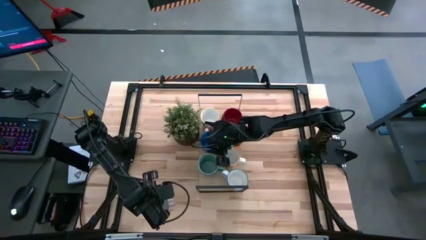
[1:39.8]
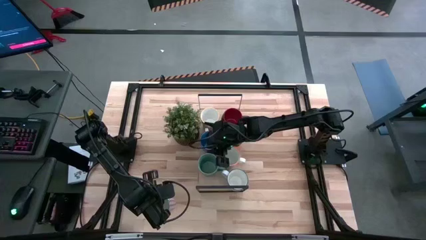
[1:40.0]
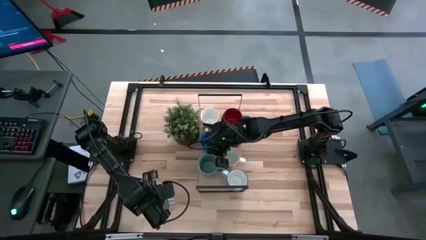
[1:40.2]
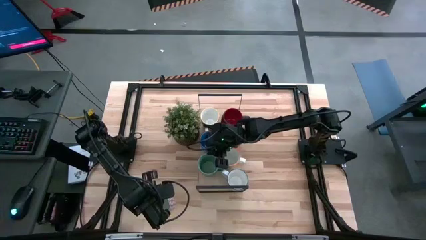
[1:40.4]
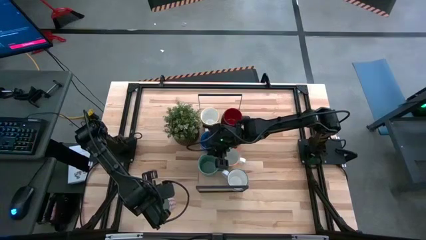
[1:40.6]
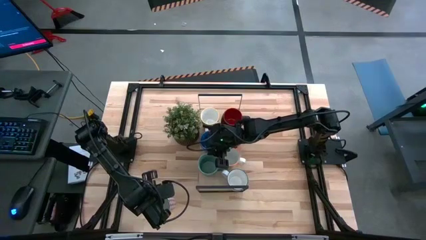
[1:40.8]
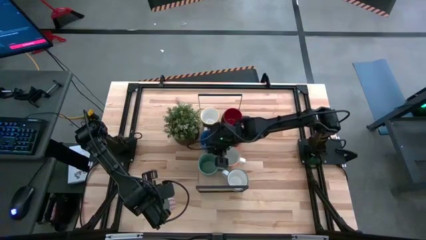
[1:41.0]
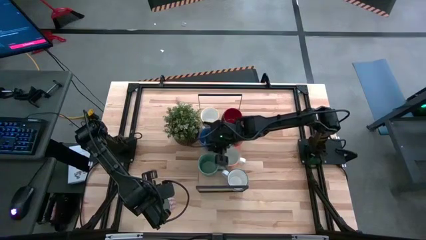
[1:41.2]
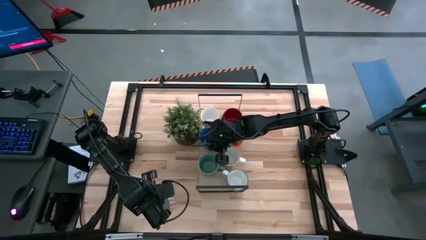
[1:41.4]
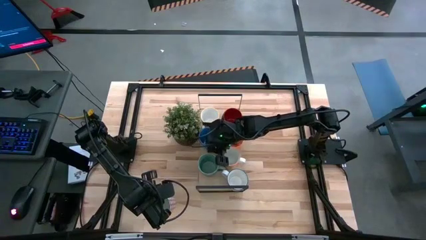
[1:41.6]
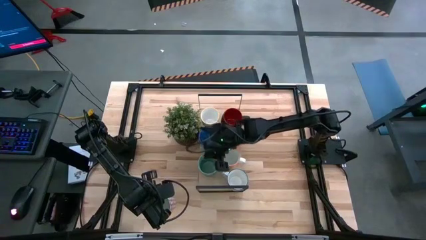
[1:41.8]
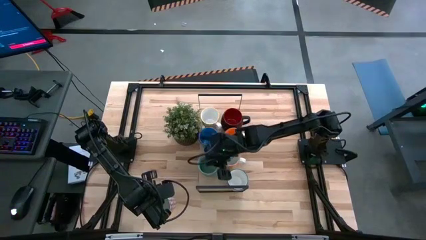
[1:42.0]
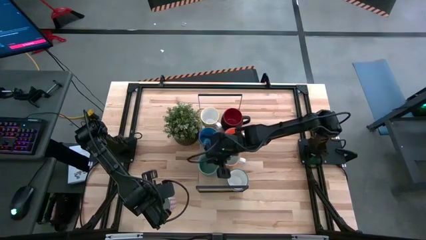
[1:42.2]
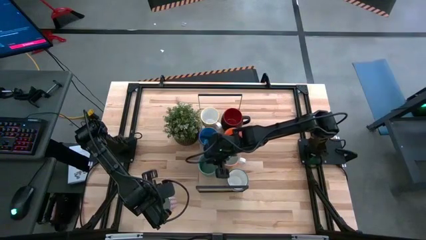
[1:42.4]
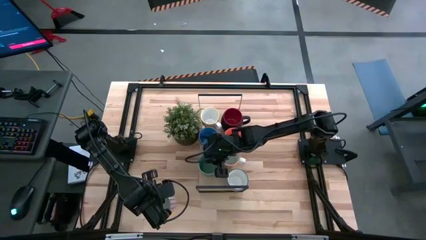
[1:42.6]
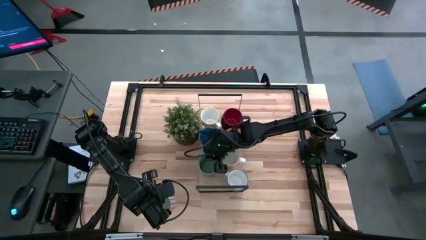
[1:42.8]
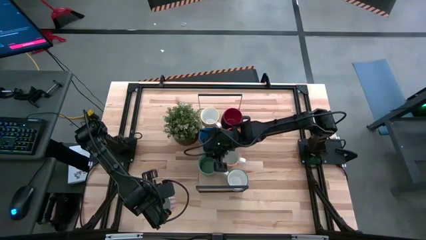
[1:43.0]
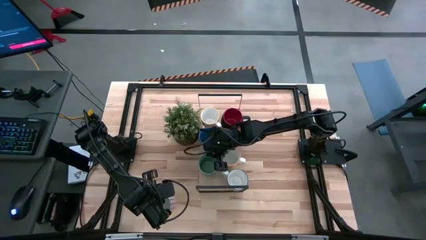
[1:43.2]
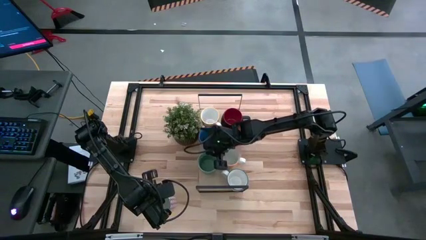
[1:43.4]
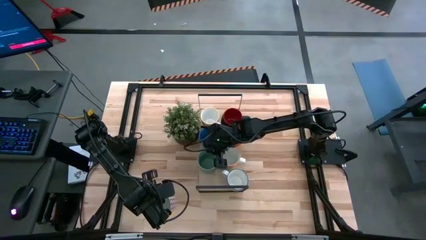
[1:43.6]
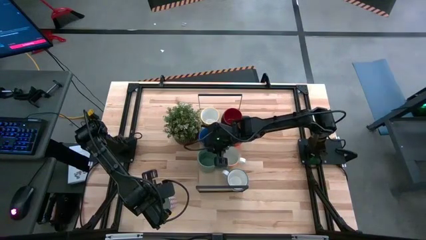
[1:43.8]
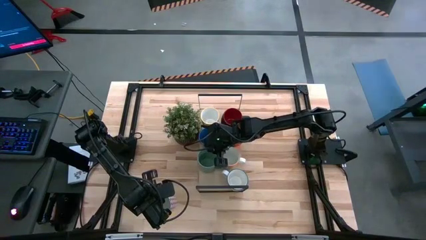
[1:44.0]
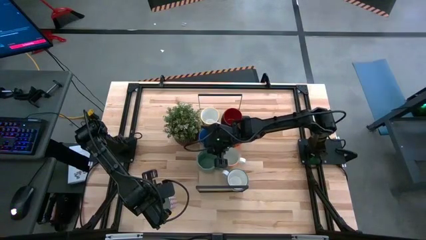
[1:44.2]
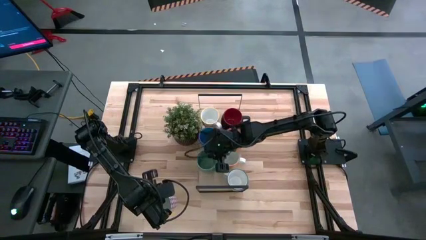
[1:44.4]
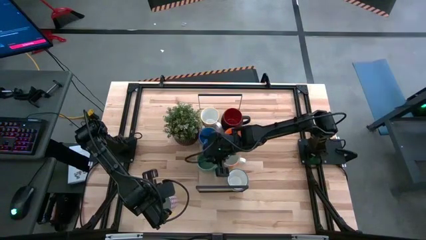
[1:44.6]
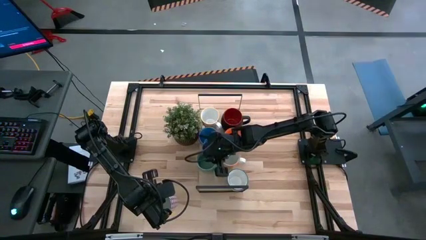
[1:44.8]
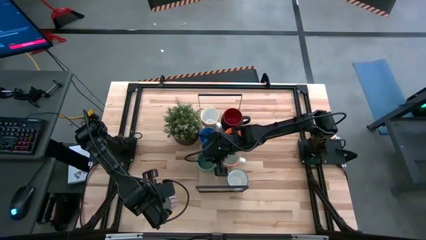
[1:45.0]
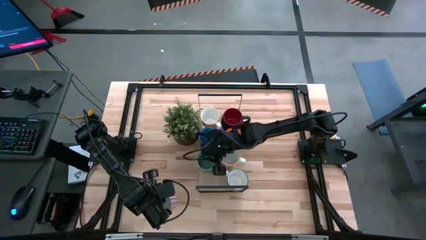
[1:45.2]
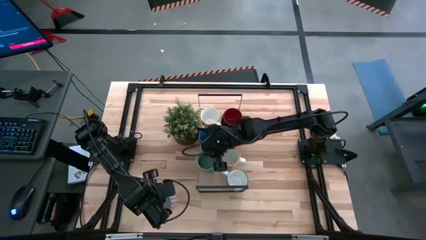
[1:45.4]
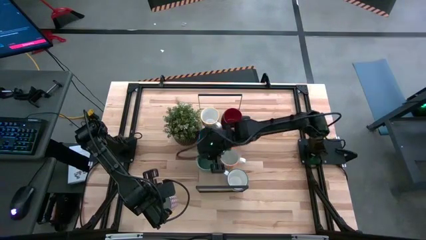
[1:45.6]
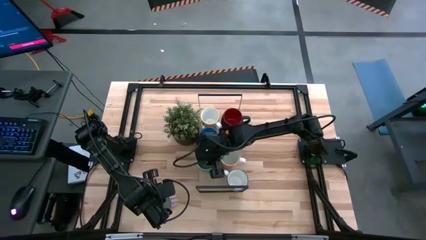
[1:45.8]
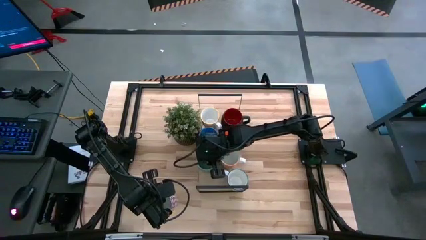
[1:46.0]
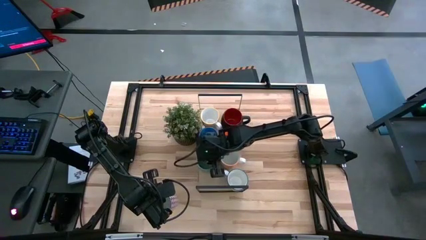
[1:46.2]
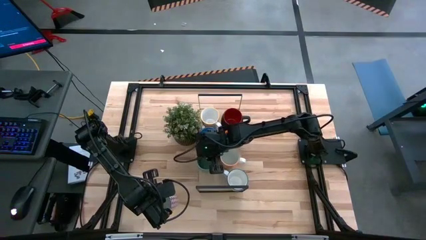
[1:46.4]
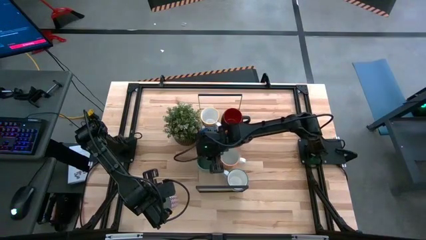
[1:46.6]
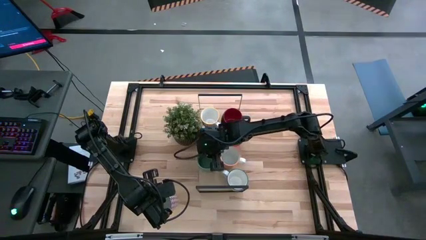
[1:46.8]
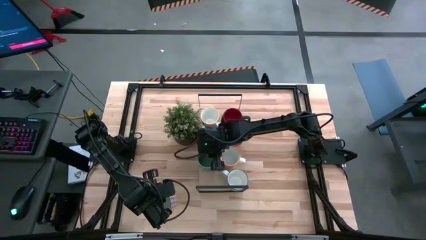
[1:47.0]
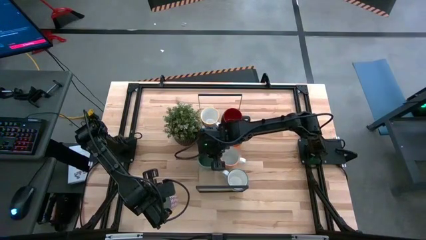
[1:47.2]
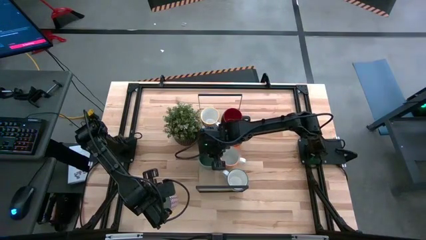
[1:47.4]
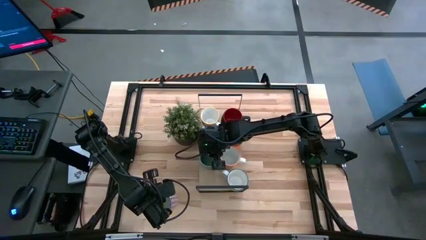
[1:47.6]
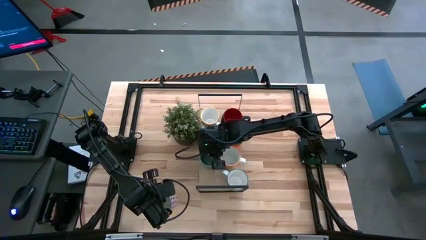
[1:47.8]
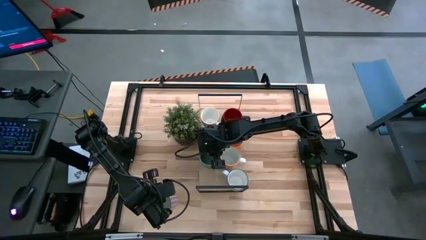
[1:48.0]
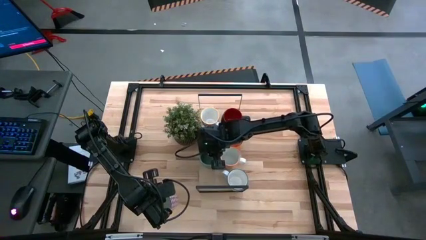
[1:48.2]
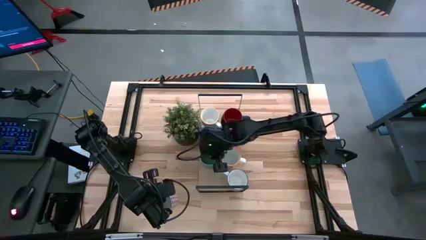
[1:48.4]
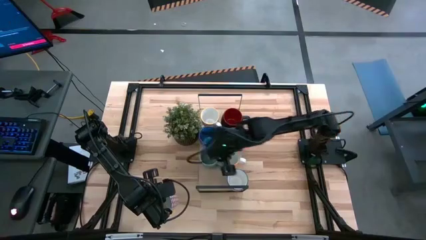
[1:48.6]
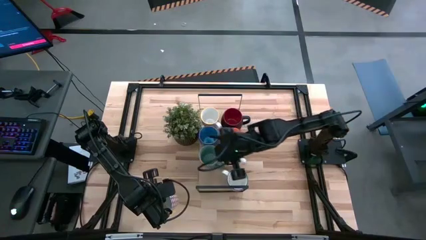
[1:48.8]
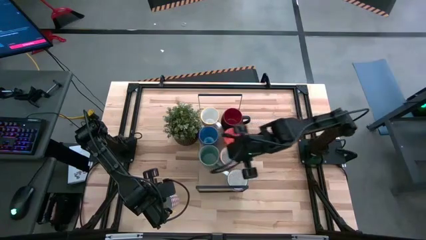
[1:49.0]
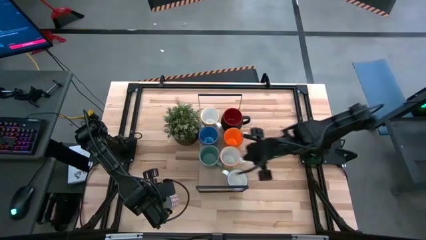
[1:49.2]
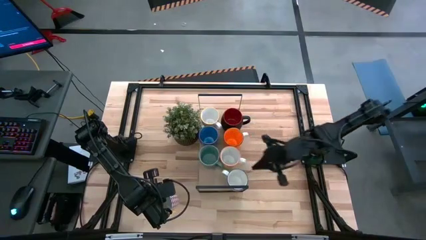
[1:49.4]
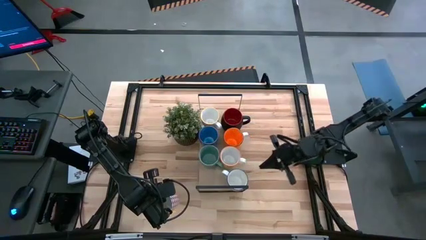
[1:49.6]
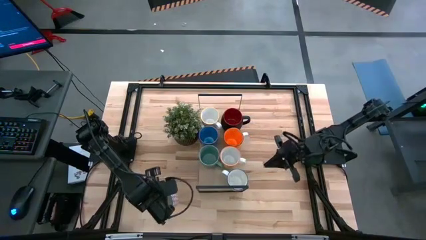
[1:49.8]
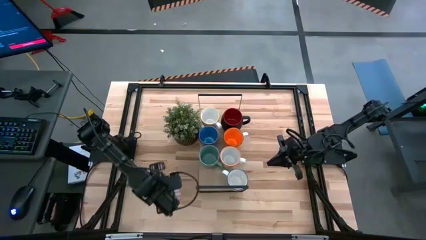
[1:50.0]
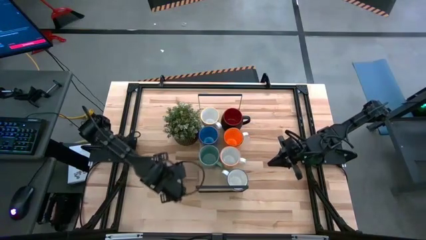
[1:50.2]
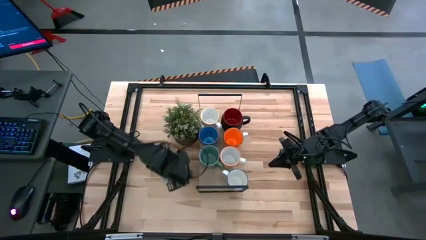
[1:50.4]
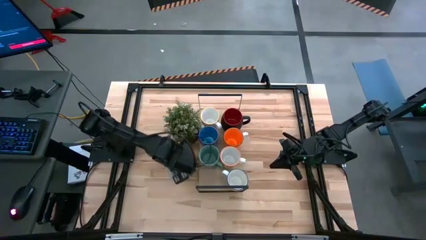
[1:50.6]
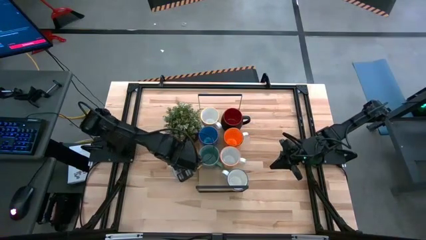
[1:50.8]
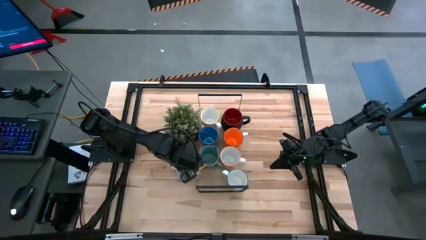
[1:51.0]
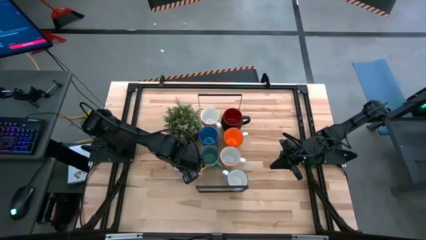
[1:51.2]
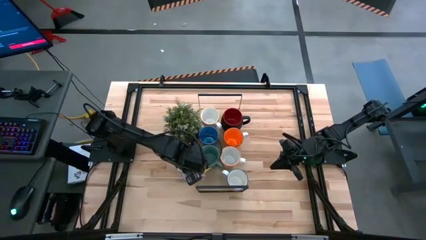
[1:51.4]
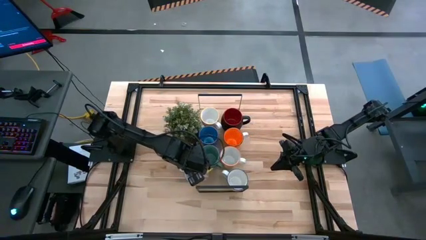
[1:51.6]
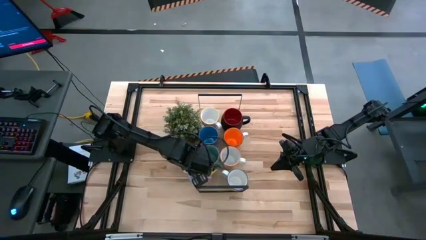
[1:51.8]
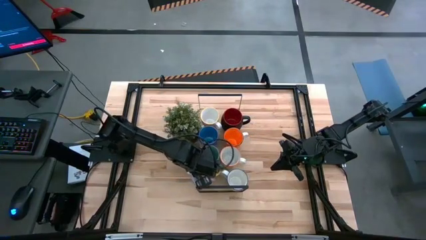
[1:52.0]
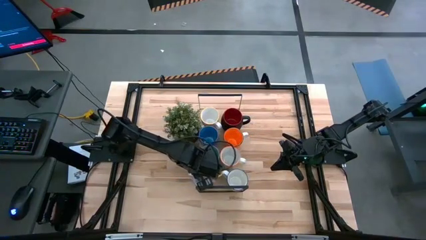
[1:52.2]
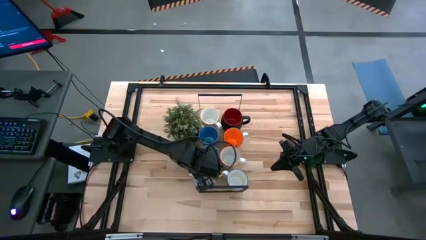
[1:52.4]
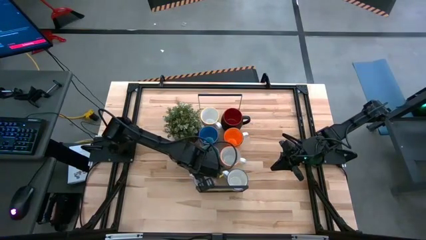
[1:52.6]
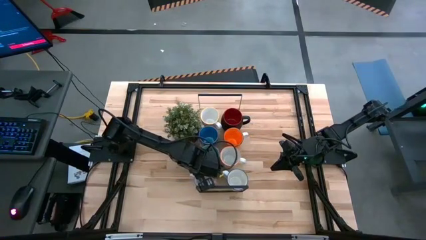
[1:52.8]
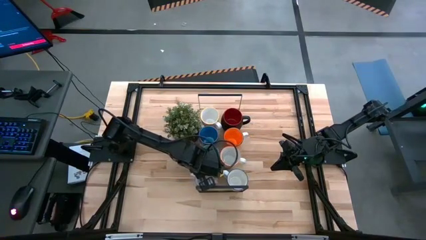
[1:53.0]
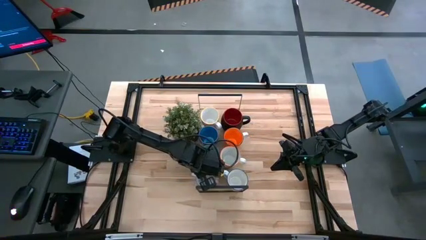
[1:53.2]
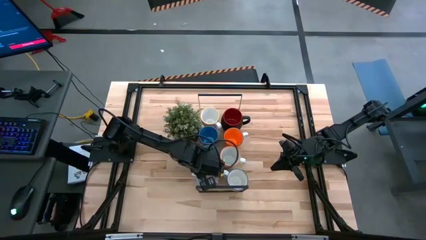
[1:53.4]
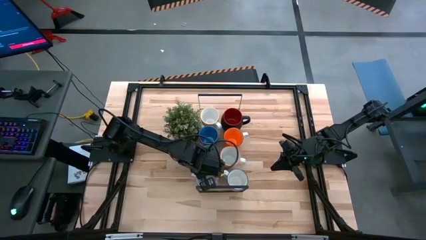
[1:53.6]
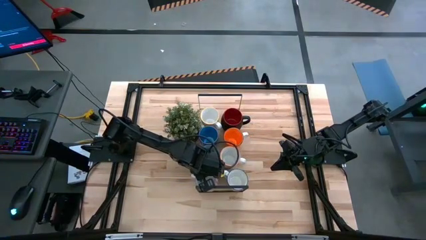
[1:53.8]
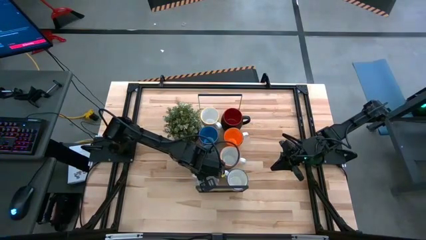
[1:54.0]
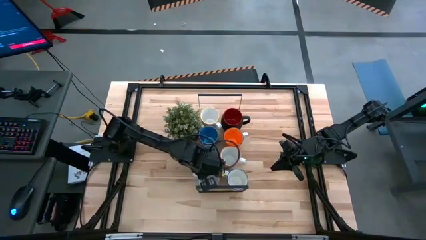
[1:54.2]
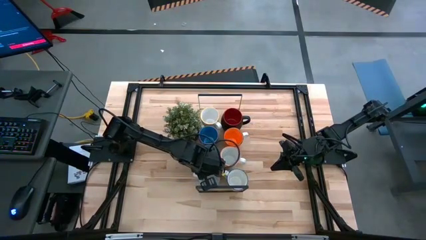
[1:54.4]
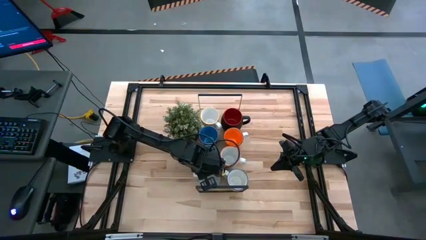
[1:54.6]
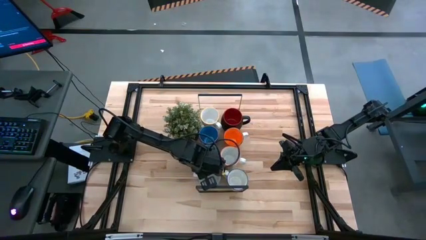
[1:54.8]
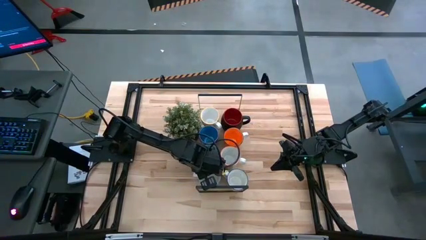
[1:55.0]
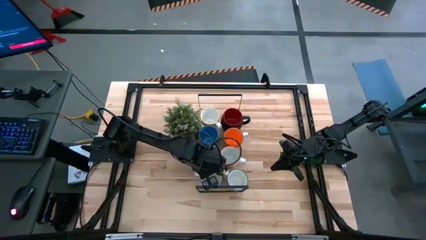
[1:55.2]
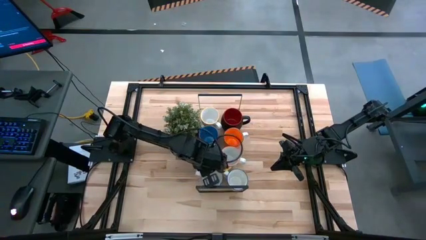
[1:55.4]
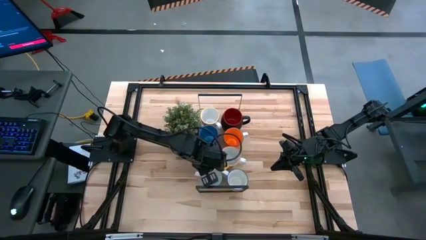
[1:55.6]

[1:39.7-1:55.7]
Task: Place coffee mugs
Put the patterned red mug on the shelf
